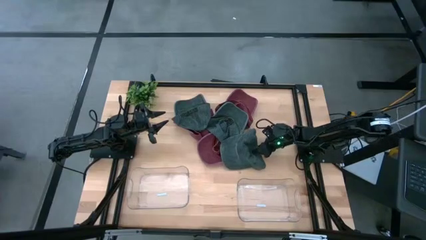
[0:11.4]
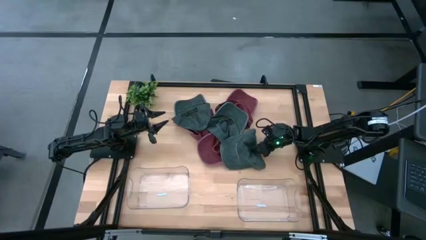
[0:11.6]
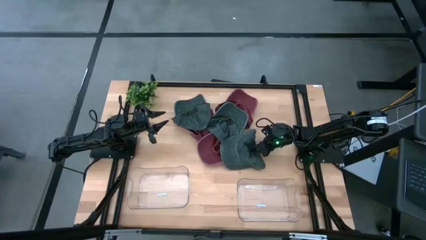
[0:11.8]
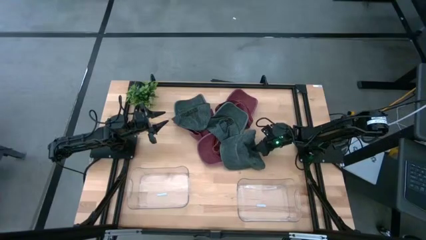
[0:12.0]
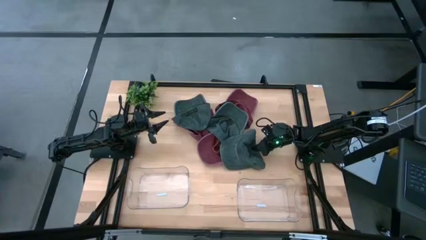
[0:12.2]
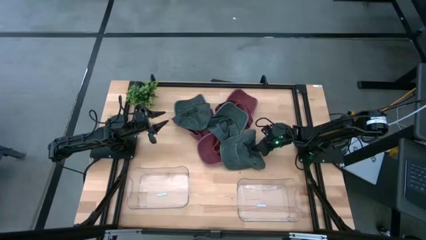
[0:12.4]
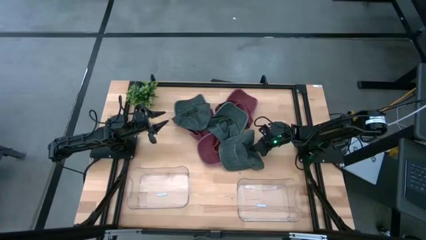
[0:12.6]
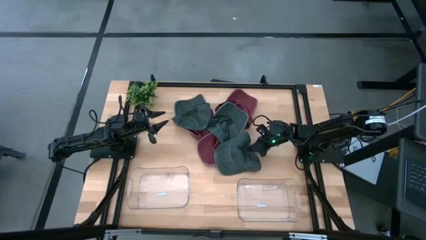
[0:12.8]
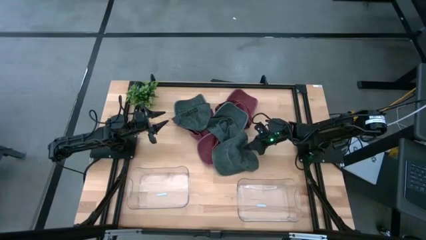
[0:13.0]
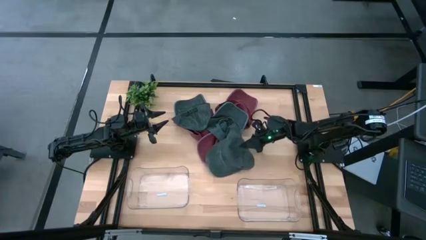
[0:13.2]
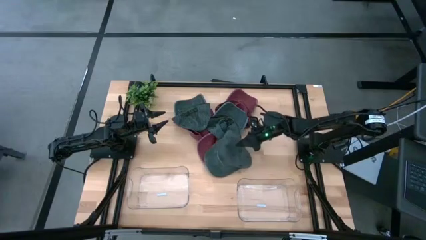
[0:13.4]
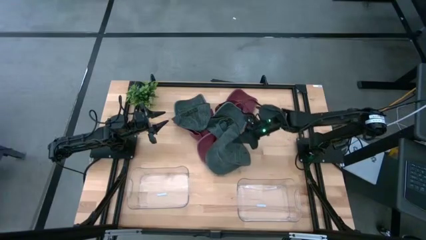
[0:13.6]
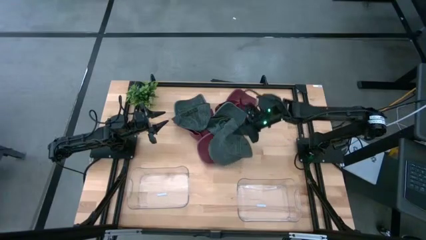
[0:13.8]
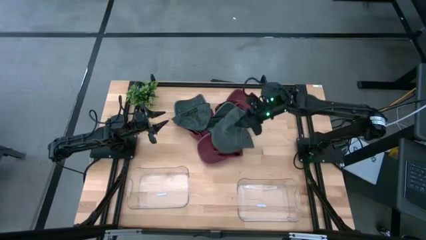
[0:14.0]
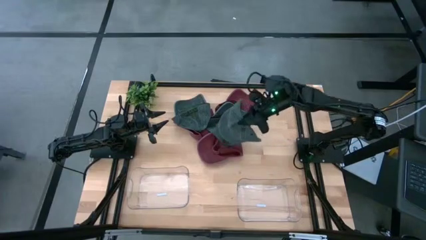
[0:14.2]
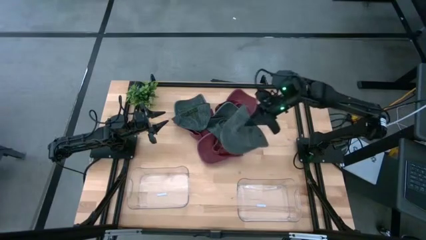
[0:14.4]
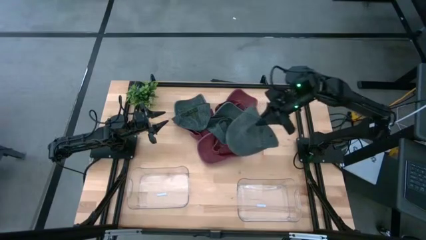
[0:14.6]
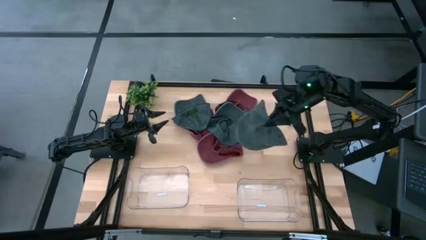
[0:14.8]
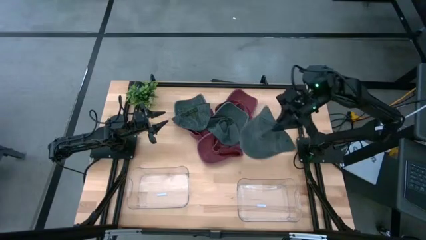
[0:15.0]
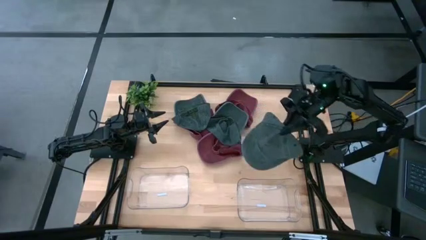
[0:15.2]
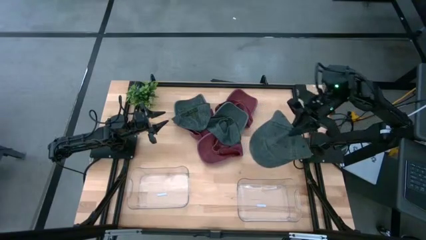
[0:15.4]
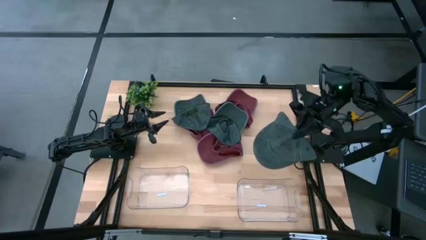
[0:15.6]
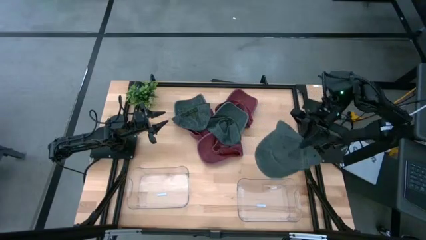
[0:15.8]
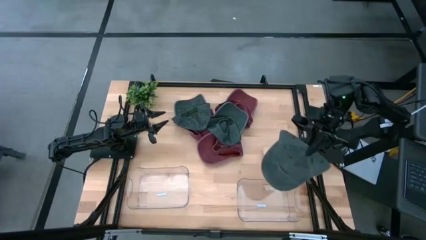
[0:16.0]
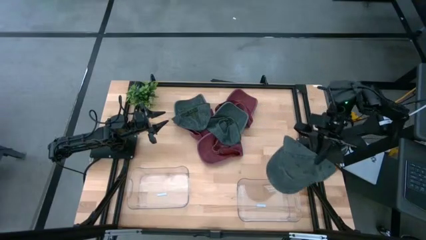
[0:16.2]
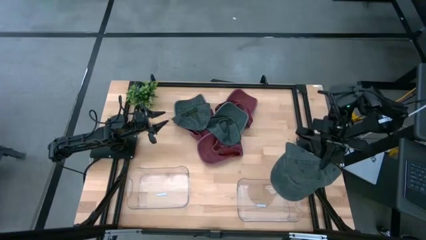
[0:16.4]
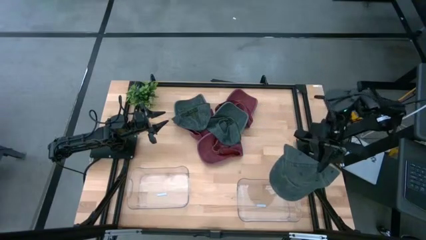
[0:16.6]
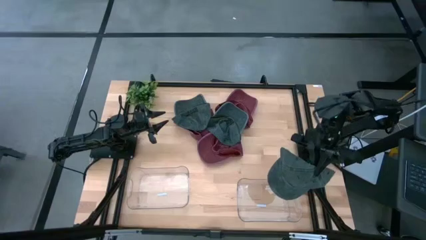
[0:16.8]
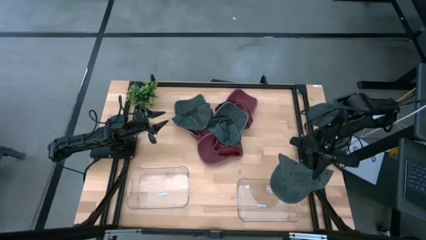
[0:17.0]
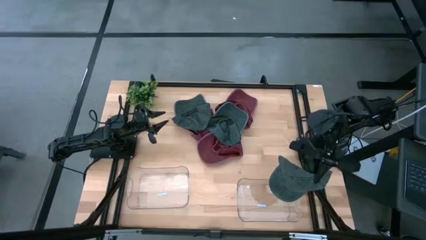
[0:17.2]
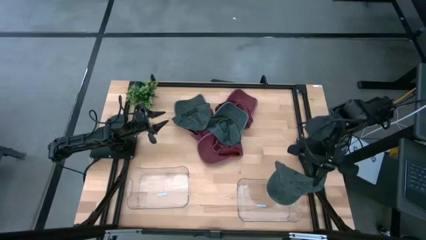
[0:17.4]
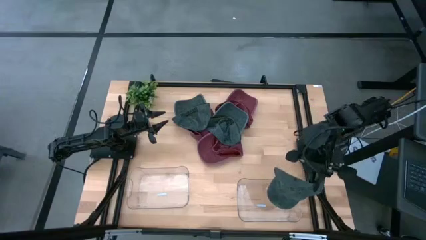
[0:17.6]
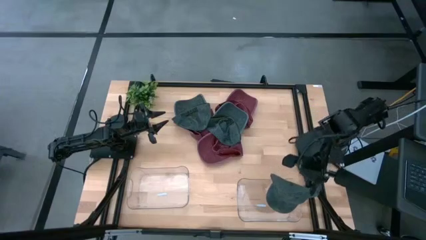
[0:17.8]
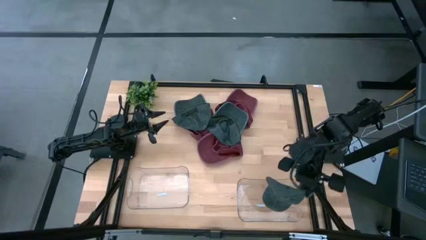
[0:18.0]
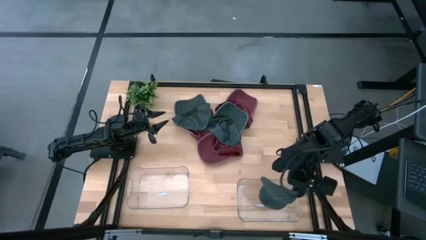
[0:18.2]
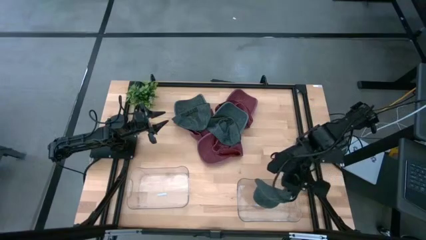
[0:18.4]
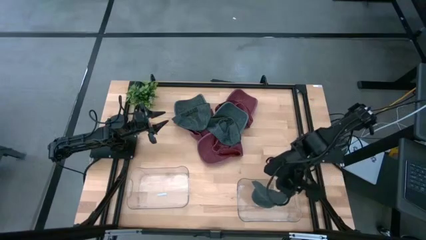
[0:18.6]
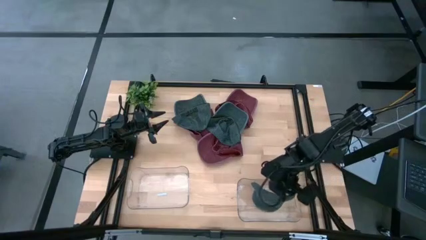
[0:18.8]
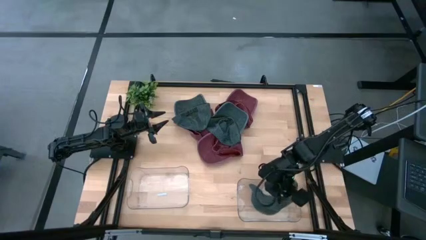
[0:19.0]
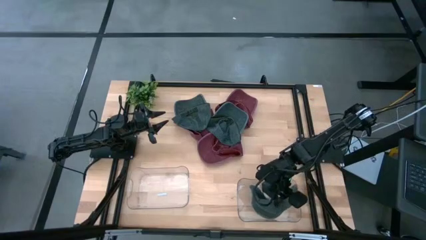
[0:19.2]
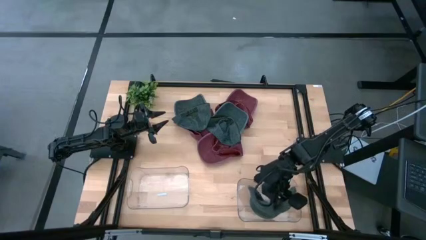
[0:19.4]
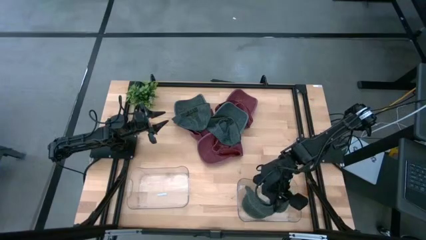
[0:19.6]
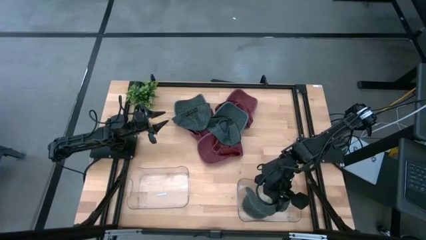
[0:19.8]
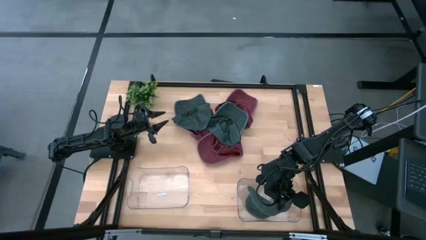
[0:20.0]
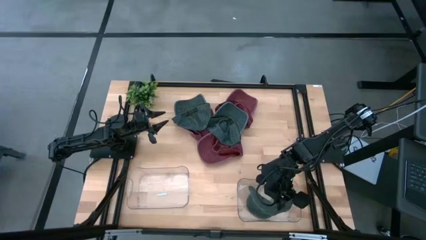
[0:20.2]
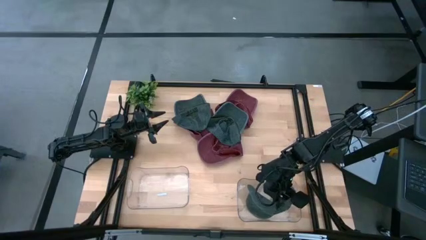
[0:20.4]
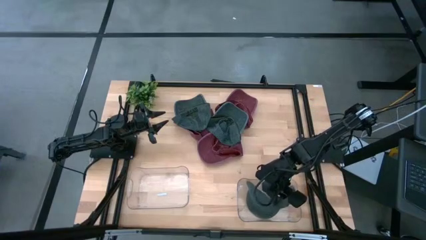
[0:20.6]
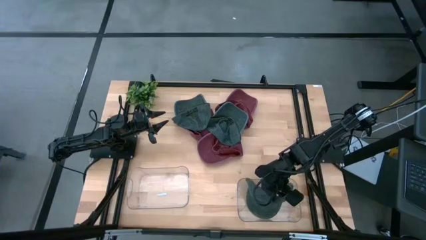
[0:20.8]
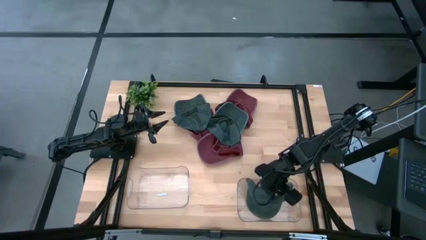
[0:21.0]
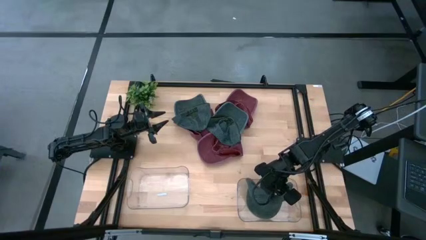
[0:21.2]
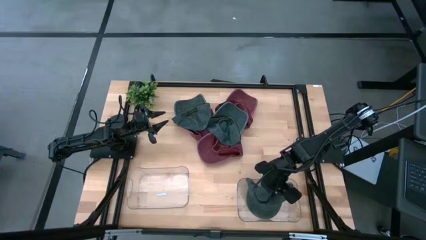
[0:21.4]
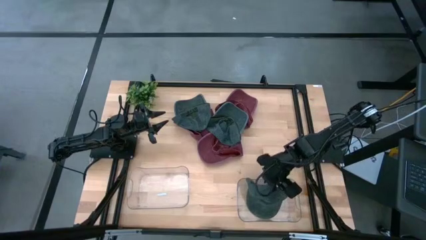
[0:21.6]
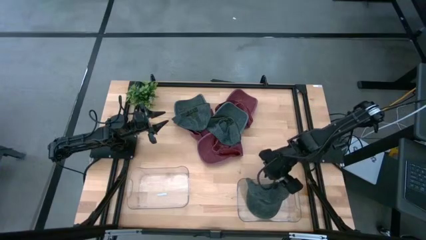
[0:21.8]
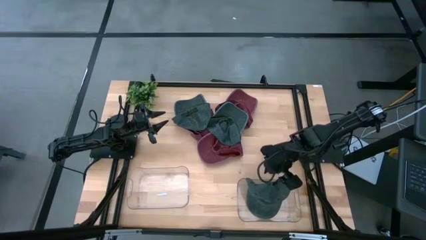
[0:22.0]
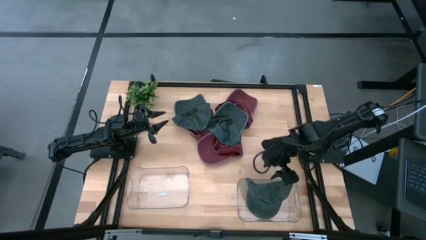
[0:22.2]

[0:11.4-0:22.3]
Task: Pick & Place hat
Put the bottom right black cap into the right transparent bin

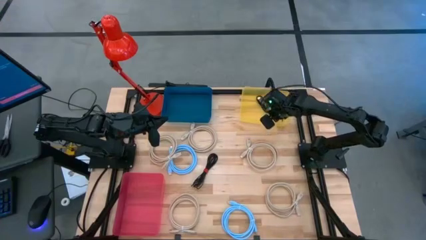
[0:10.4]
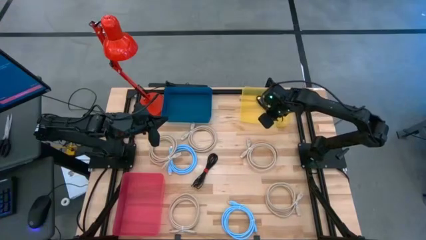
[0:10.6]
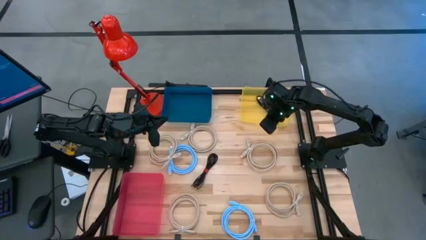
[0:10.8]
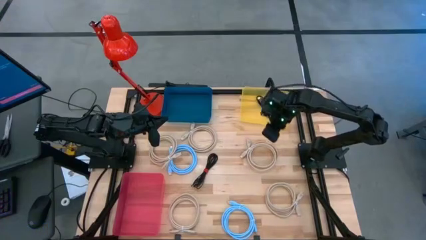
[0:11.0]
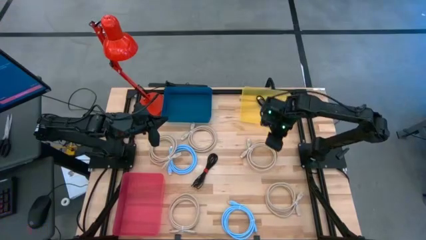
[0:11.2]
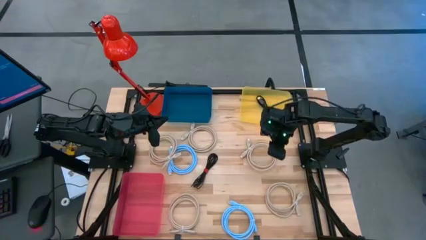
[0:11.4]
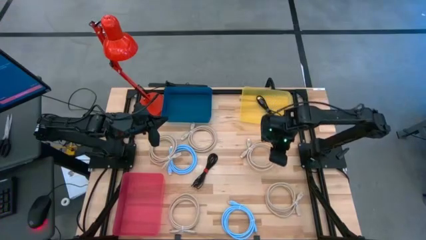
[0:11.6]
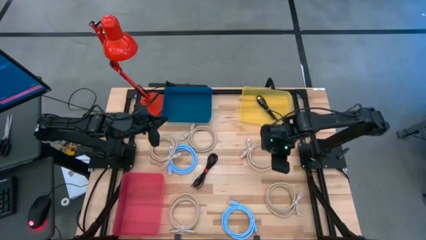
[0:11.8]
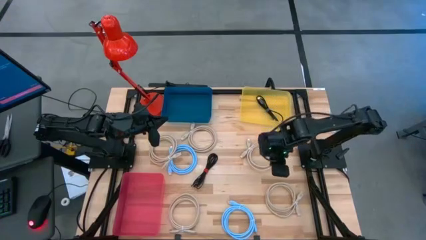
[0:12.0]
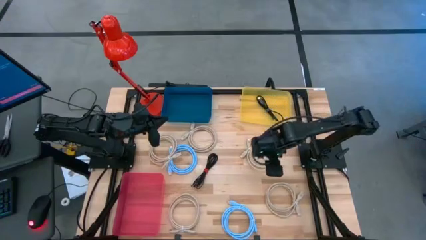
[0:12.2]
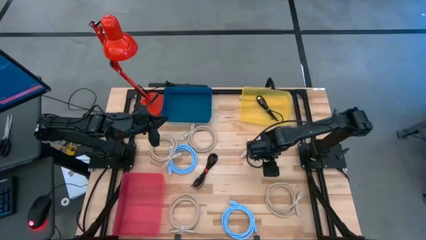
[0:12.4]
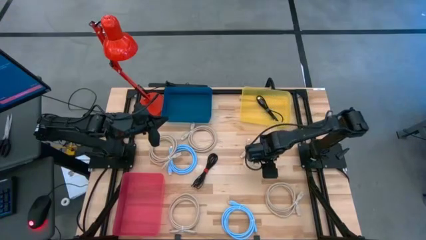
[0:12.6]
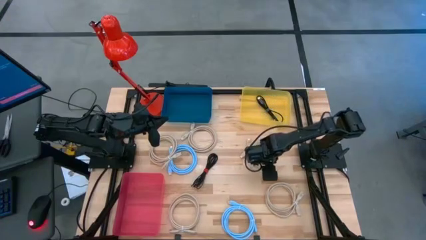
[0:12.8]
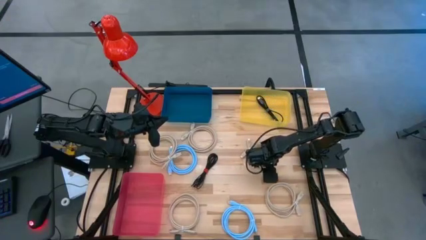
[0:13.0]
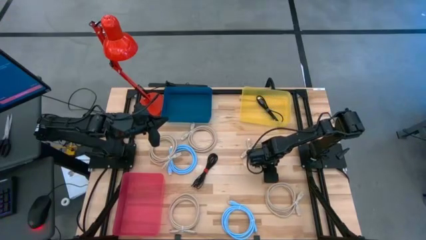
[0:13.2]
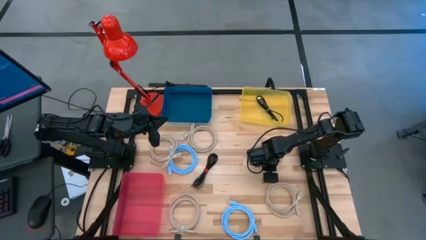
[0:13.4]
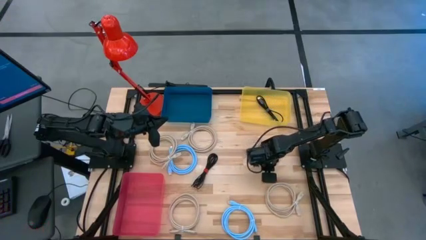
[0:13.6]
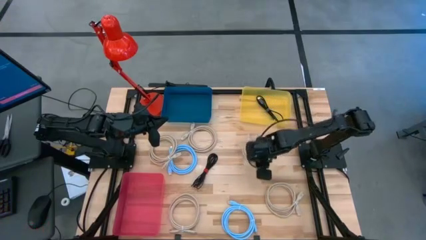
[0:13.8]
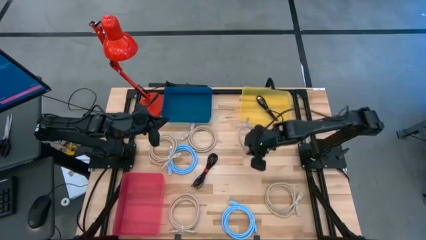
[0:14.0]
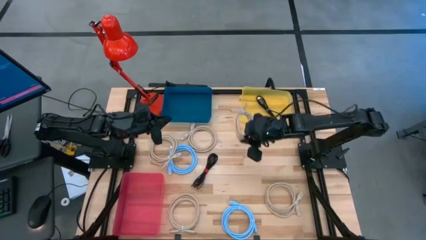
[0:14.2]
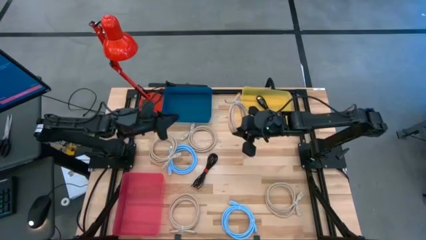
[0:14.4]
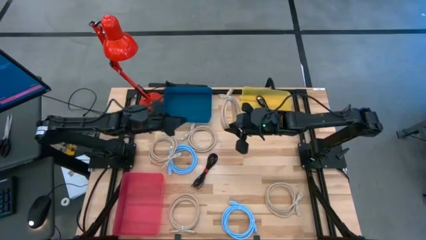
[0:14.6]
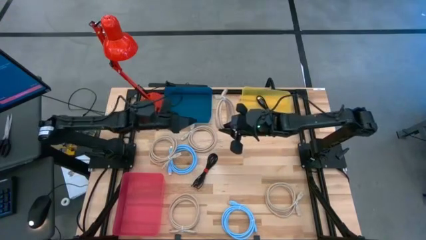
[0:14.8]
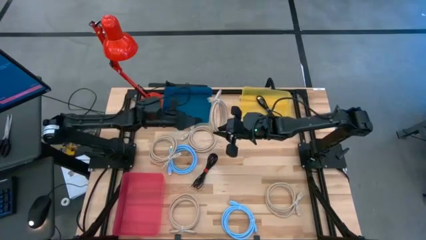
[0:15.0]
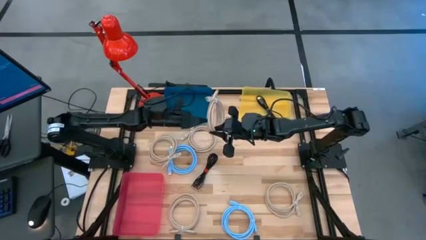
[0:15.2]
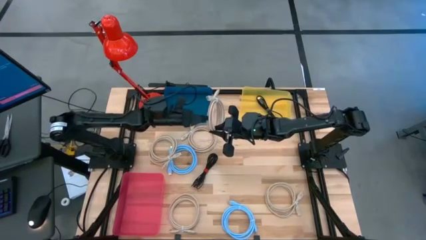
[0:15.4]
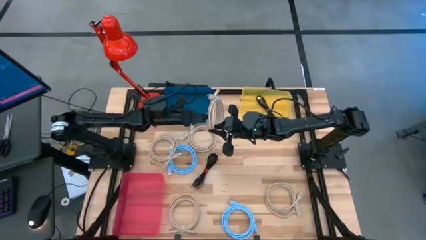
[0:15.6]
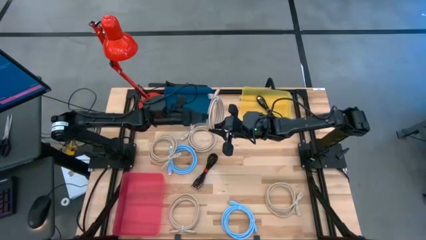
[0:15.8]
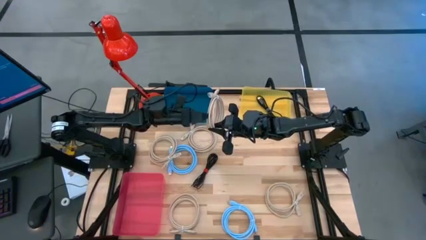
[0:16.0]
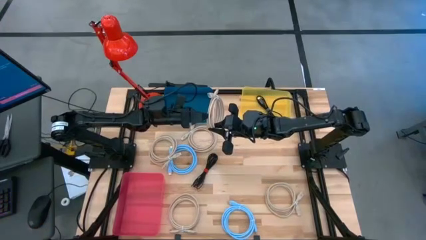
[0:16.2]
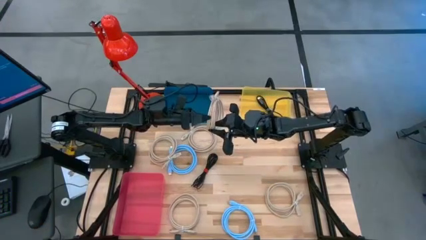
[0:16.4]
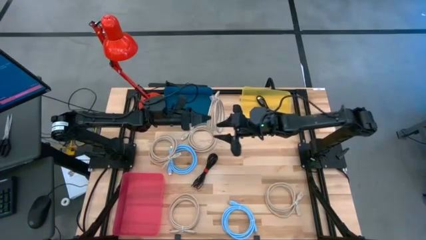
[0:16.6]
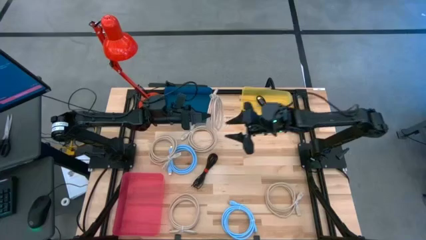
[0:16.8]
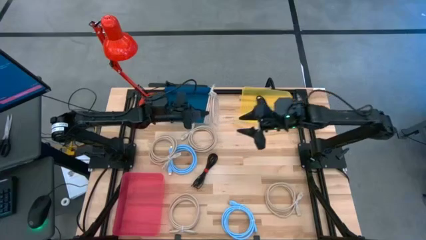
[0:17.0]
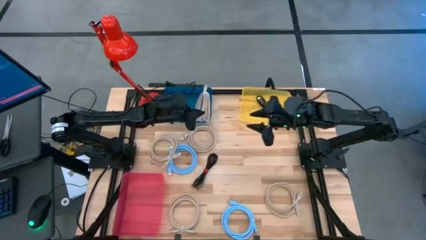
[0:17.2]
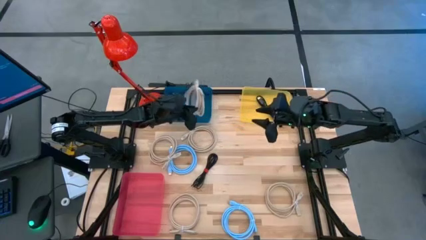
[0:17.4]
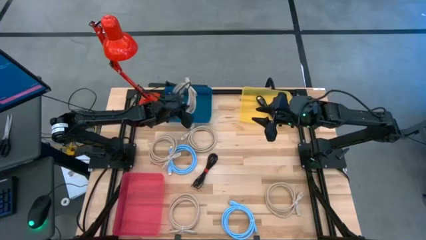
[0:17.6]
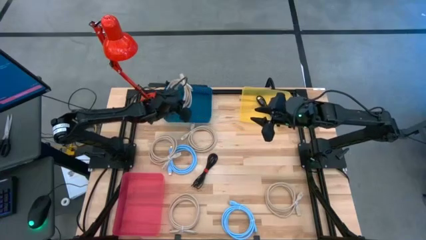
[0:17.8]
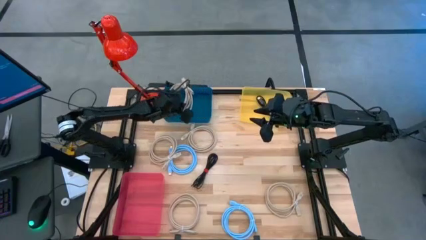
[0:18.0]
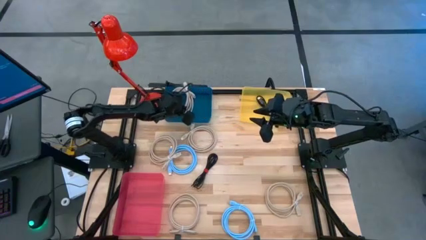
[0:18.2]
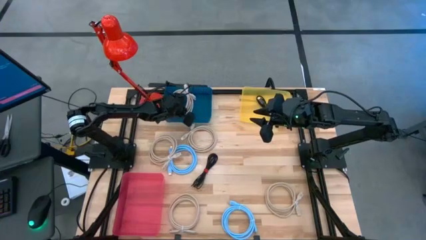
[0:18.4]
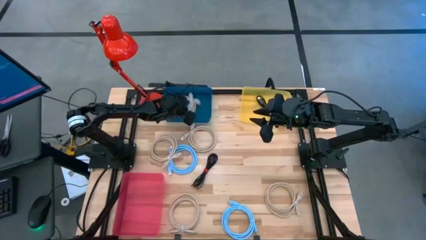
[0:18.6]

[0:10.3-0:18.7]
Task: Pick & Place USB Port
Put the brown display cable into the blue bin
